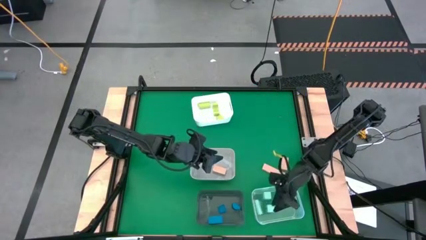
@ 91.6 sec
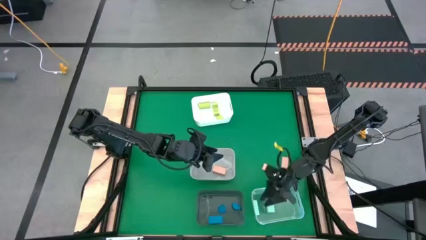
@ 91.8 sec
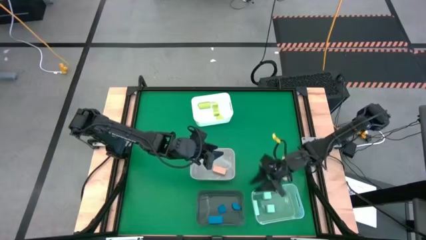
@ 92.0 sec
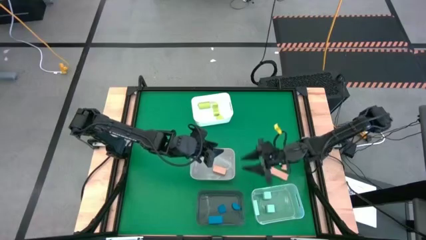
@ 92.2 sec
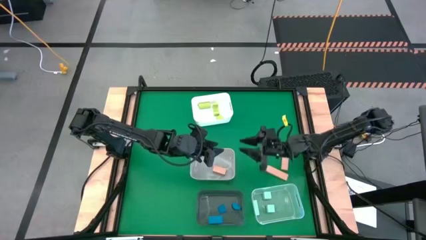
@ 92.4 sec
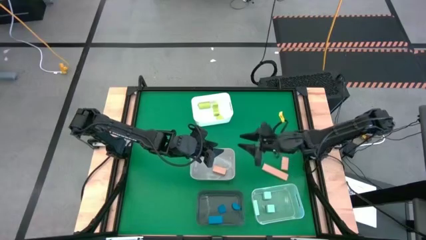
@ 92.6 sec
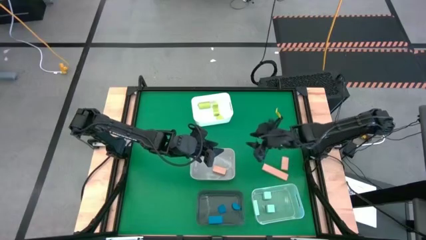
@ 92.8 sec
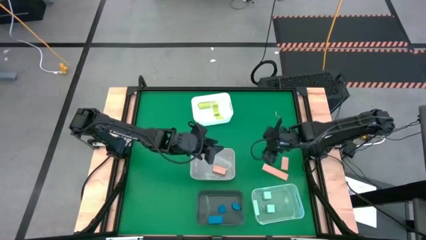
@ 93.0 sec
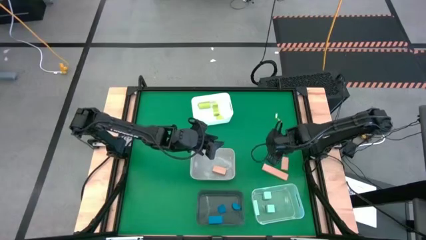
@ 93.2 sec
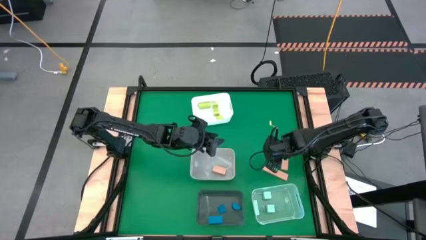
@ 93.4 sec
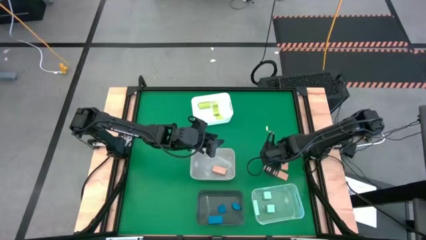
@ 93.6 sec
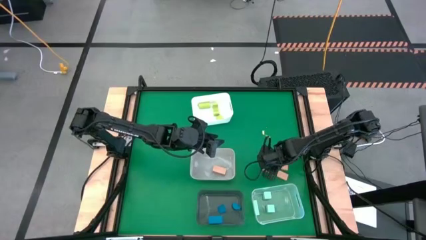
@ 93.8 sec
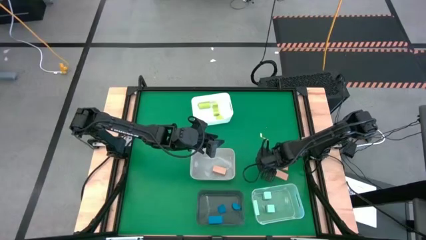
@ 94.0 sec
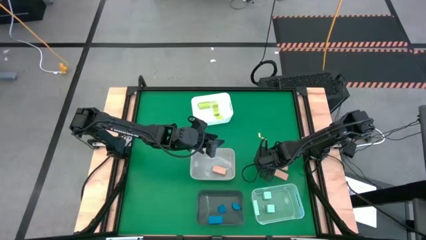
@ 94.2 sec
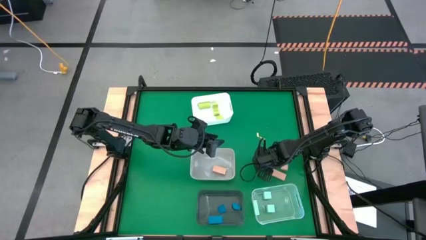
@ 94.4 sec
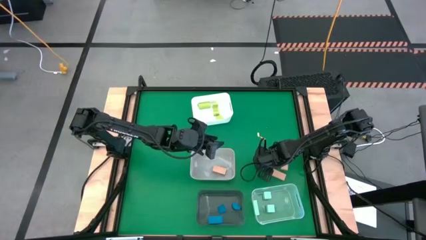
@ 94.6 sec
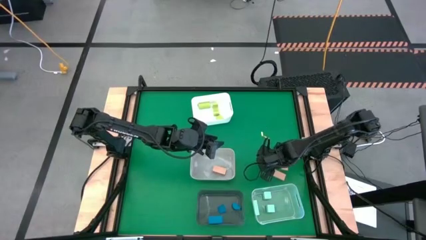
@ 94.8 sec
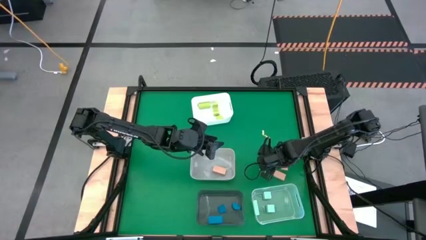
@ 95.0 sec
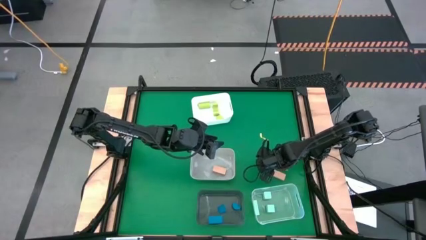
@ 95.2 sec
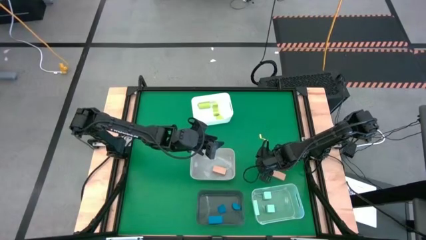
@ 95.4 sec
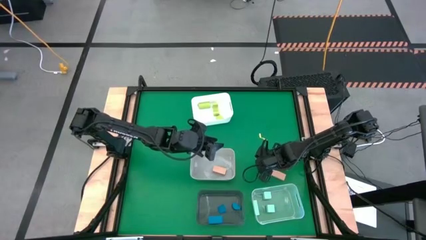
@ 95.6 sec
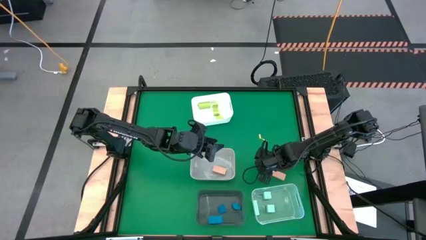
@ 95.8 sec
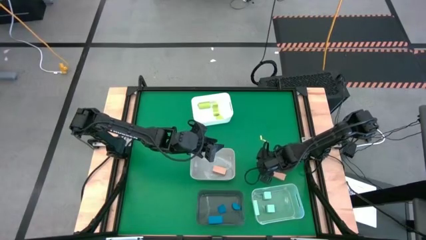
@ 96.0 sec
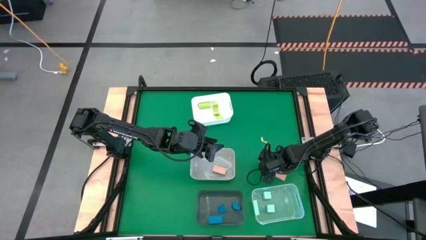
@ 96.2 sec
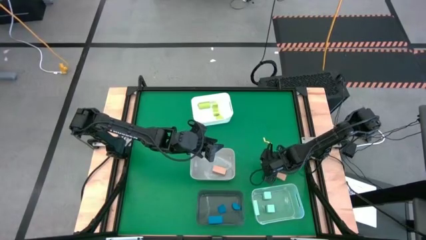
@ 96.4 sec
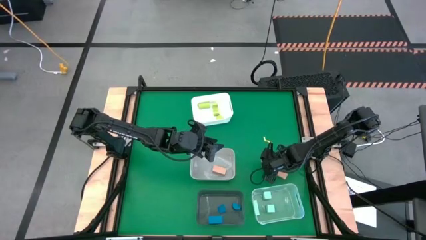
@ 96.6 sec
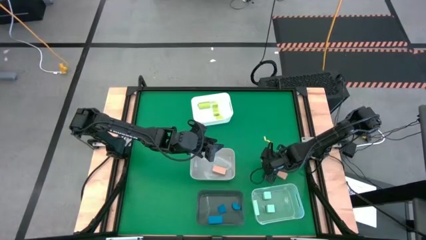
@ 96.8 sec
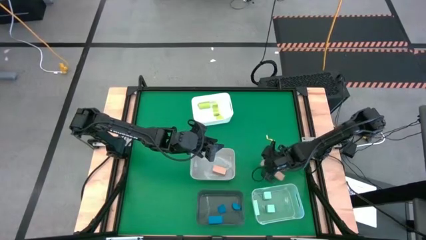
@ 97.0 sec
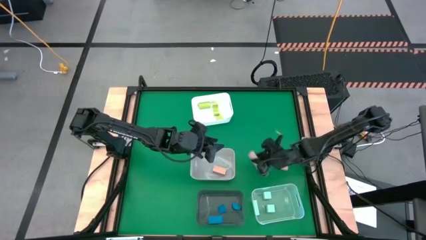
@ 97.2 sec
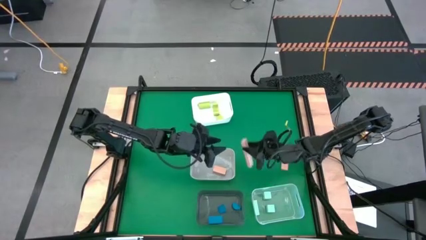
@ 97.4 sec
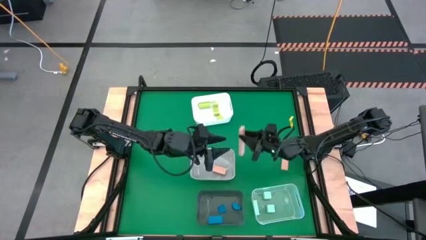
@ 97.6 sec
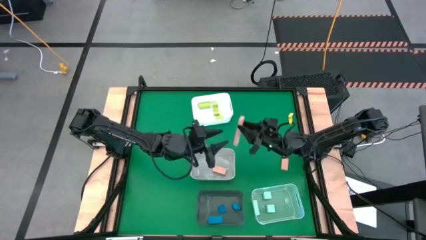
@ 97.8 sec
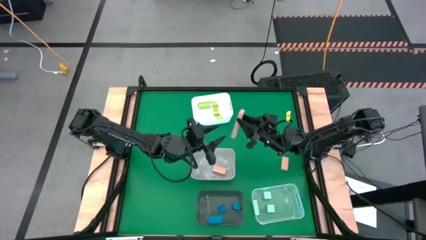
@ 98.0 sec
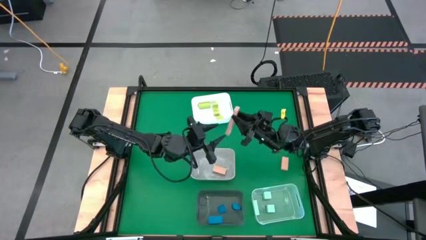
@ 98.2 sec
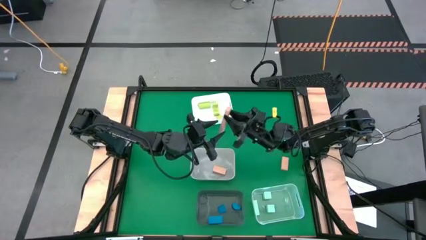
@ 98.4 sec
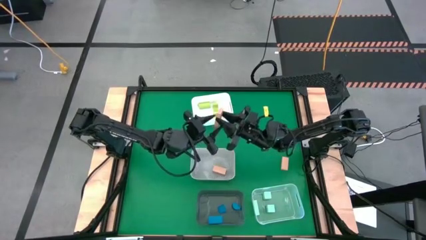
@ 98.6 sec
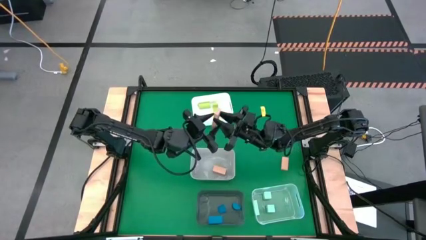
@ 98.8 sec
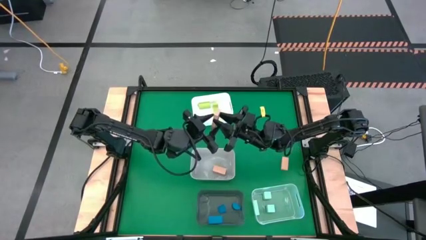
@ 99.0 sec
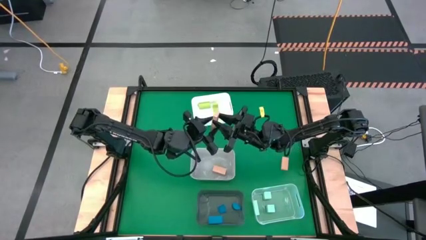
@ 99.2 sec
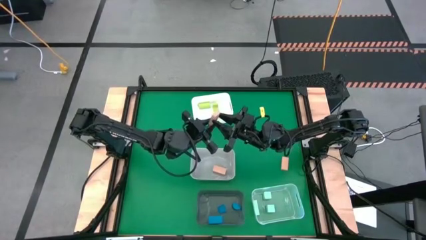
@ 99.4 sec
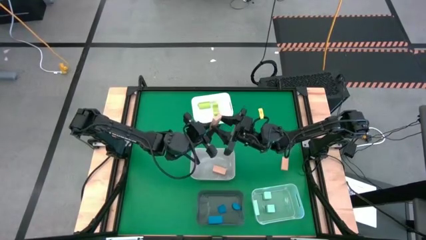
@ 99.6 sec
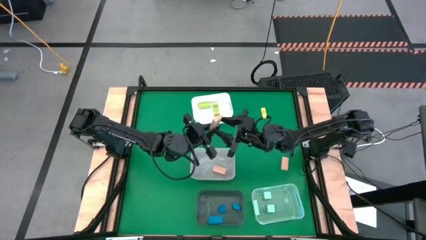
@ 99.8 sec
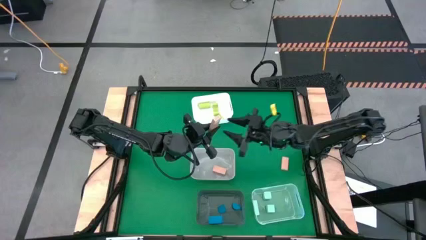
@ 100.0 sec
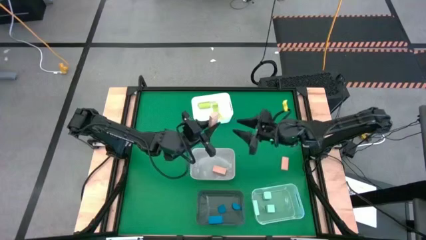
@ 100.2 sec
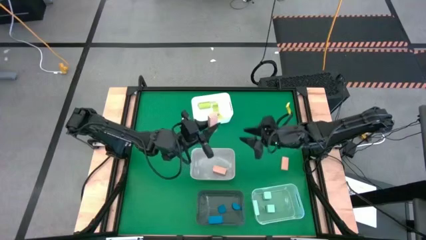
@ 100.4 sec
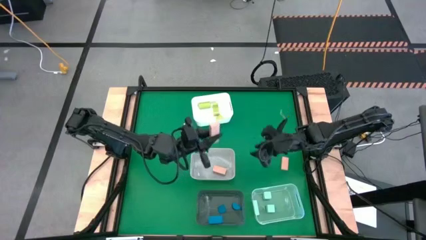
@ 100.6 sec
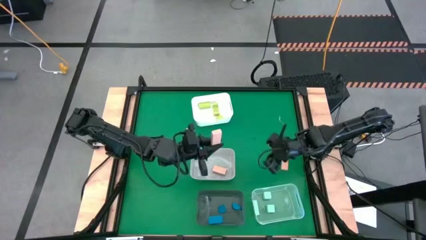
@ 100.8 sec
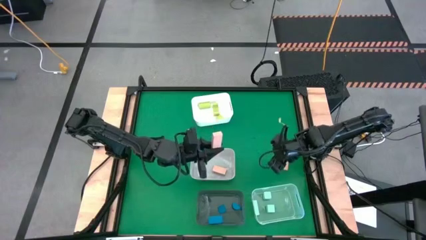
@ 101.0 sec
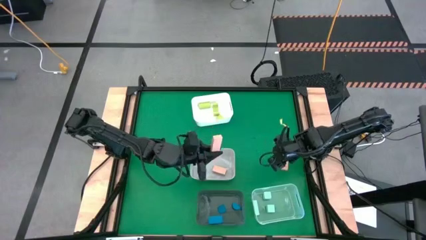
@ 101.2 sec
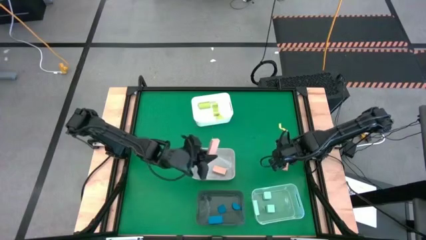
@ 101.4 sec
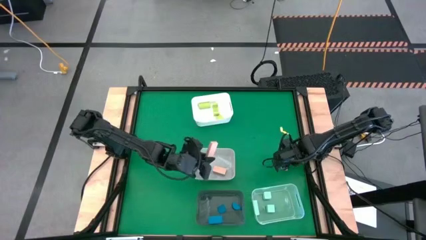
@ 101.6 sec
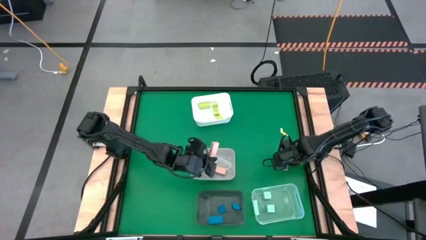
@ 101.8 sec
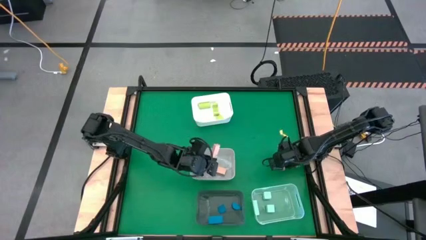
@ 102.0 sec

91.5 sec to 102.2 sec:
Task: Sort & place blocks by color
Put the bottom light brown block into the gray bin

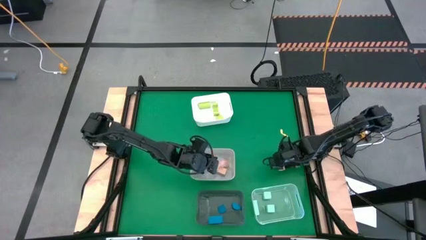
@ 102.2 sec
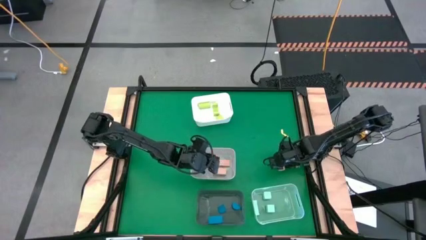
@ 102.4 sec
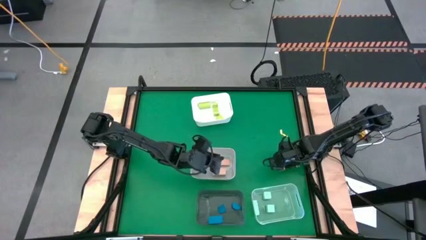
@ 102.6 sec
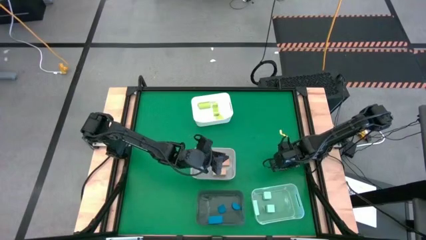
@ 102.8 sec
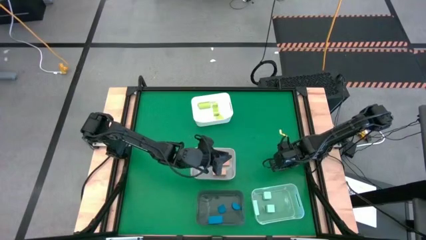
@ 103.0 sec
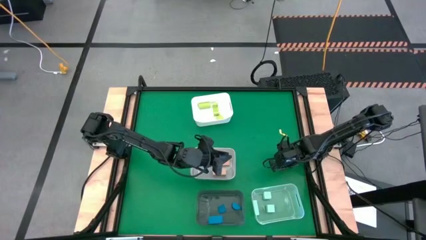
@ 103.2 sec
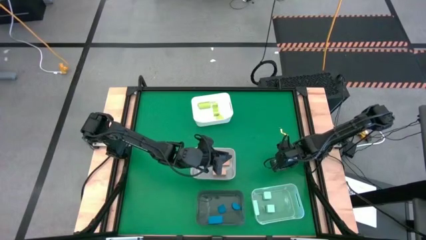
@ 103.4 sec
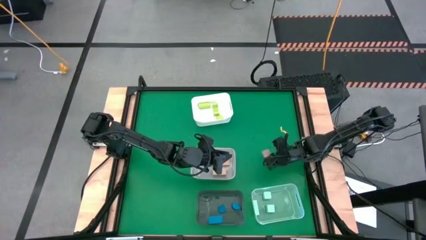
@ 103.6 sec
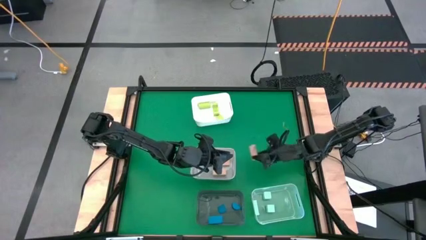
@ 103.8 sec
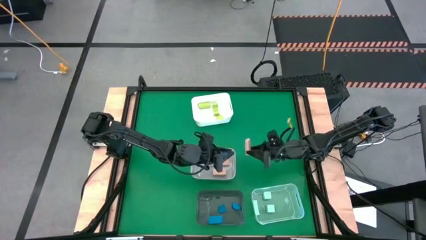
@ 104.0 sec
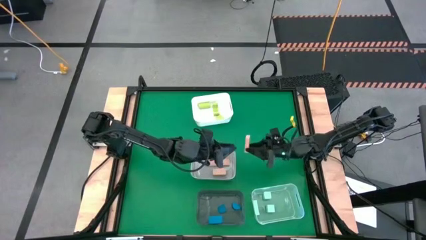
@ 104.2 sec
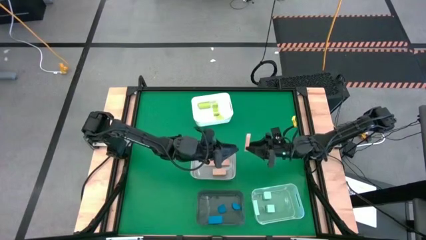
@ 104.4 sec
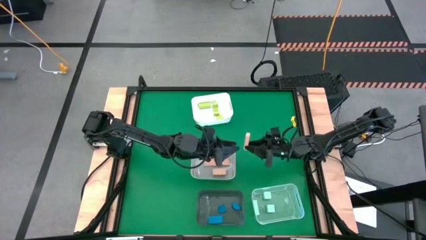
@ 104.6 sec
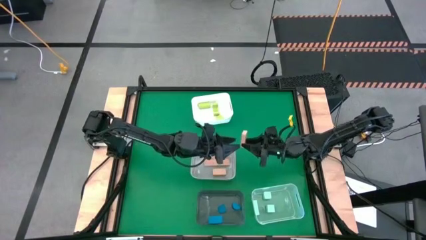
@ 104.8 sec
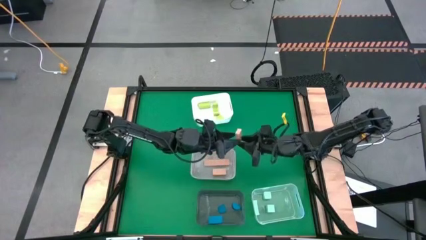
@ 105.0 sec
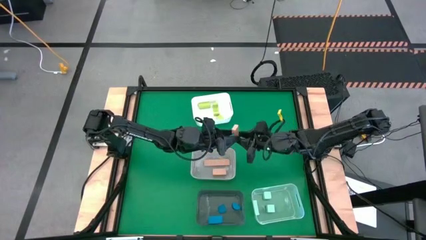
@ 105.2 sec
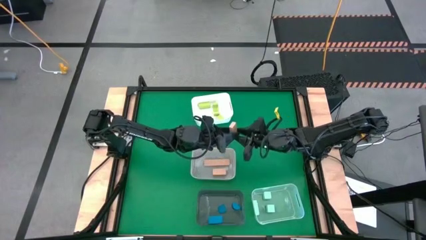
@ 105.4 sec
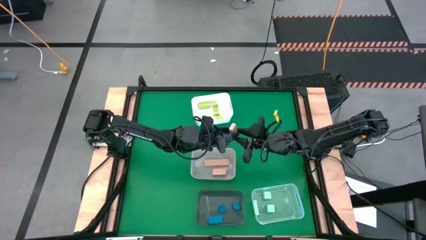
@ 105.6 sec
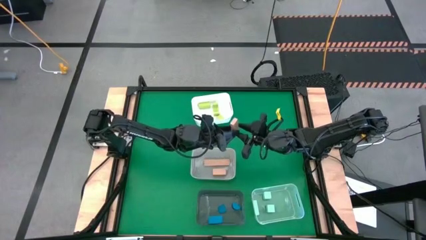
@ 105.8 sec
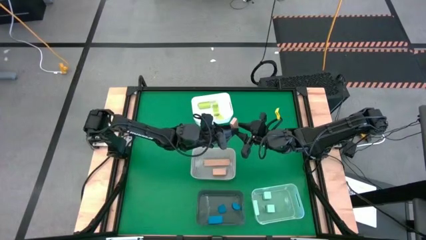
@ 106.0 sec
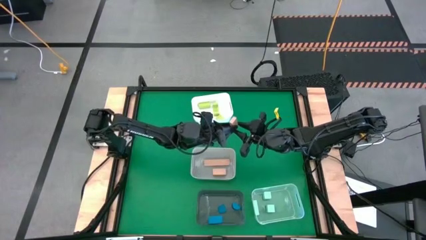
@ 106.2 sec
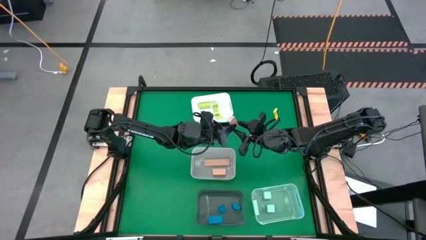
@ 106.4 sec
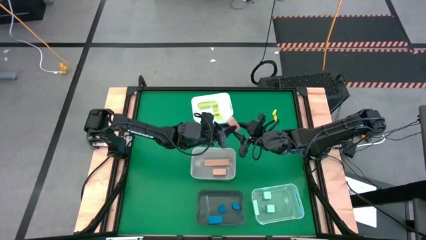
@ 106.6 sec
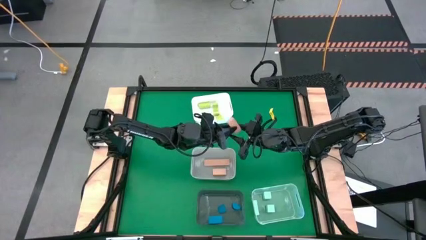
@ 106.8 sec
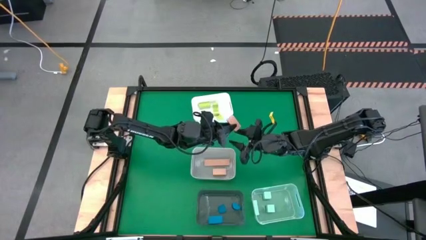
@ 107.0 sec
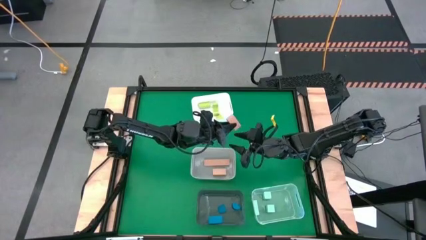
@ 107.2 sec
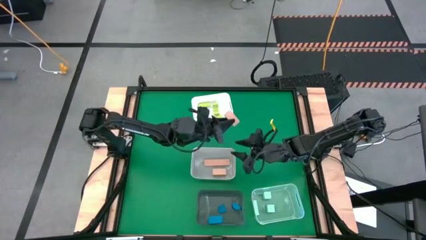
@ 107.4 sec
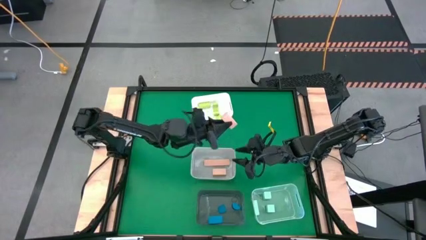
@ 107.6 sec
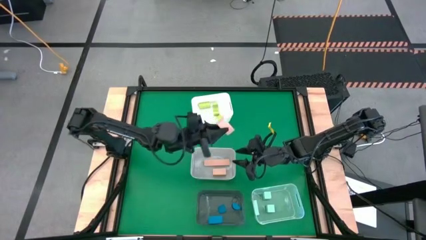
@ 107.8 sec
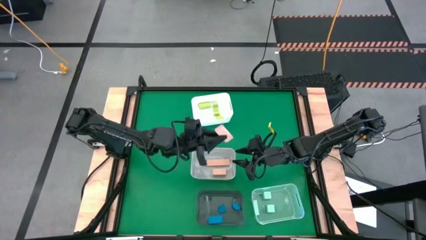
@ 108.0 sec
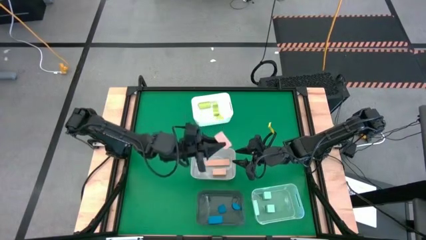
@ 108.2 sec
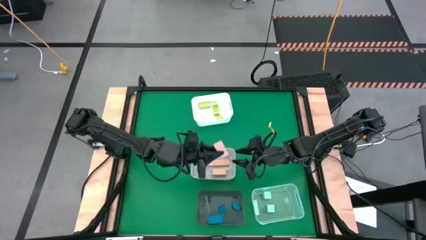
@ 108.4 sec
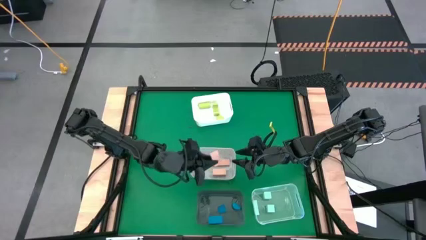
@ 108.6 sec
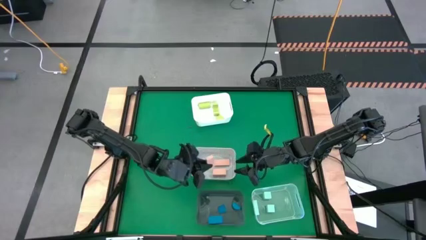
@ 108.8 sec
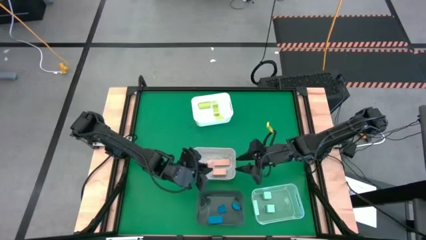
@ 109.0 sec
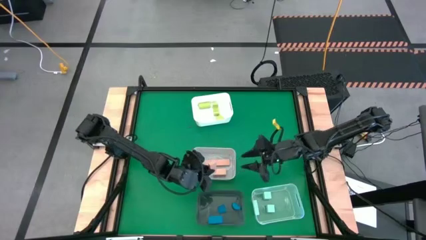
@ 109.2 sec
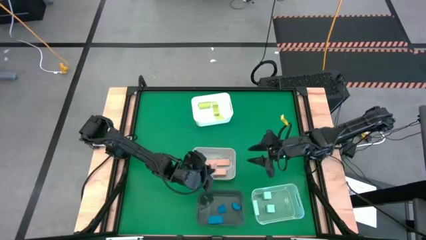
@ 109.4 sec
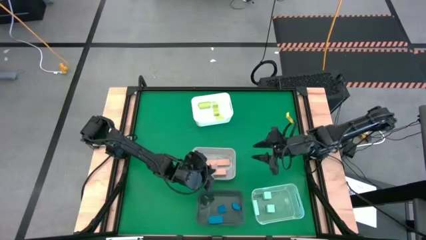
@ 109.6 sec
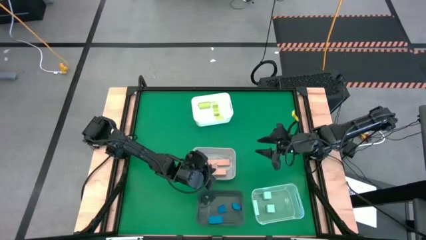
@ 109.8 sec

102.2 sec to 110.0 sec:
Put the light brown block into the gray bin
